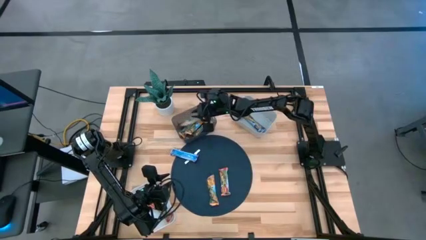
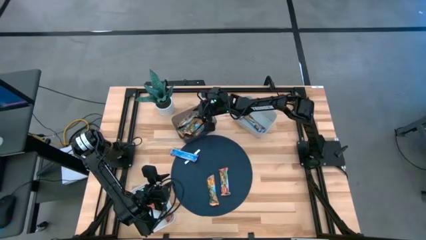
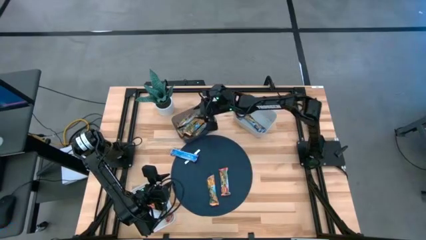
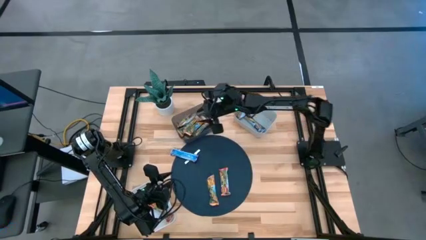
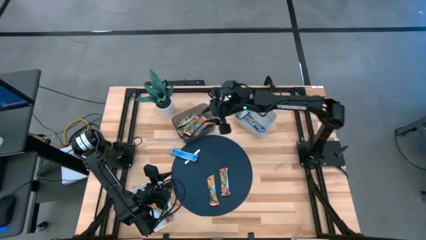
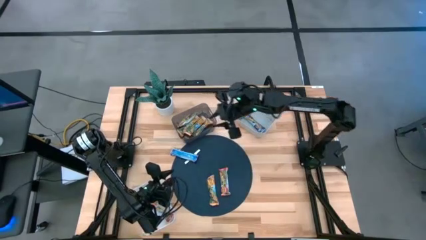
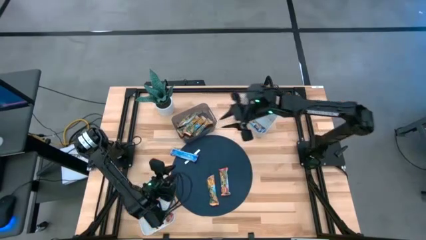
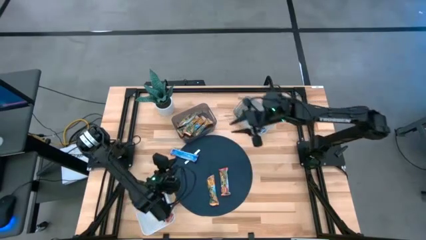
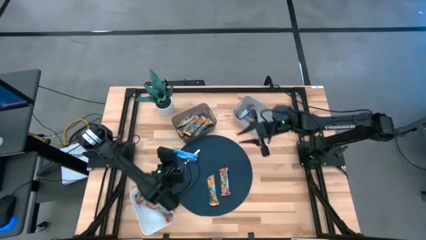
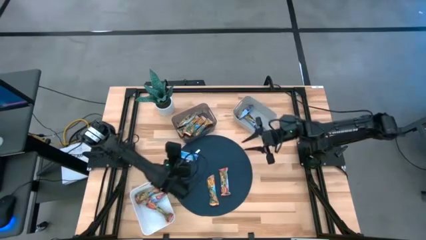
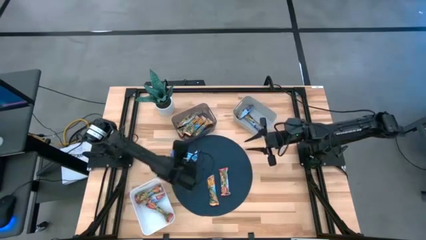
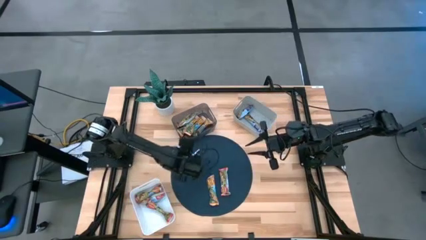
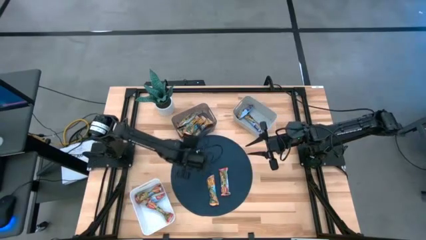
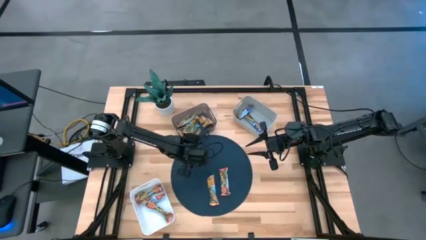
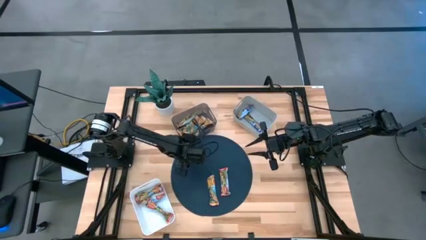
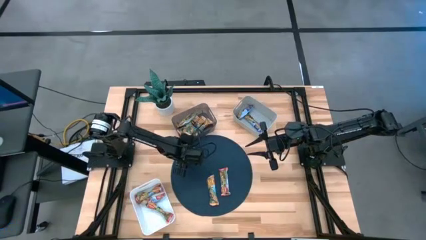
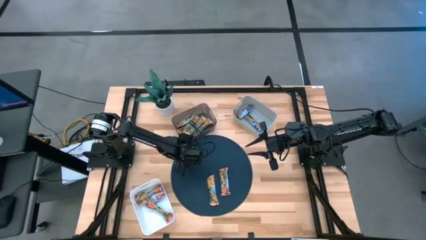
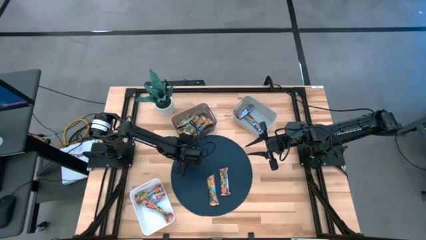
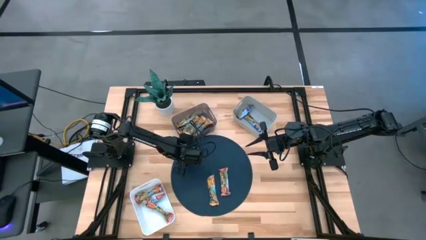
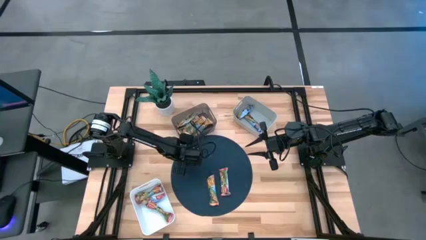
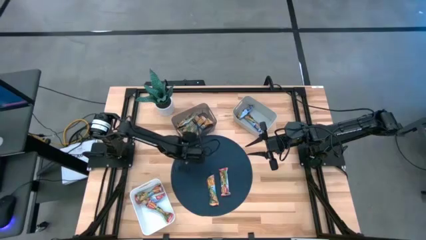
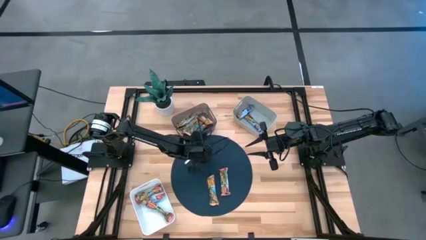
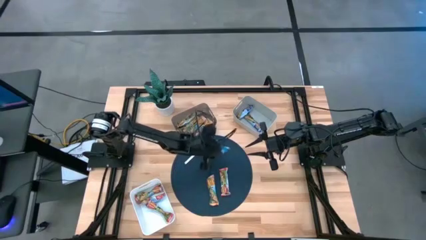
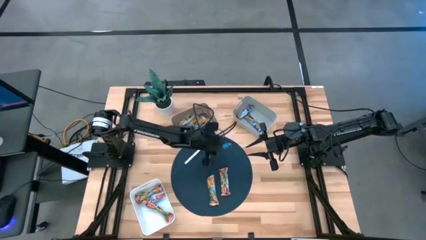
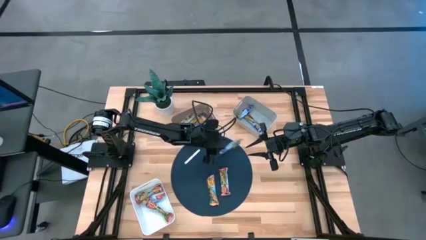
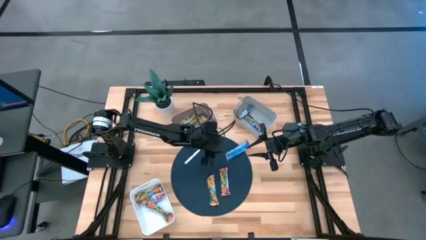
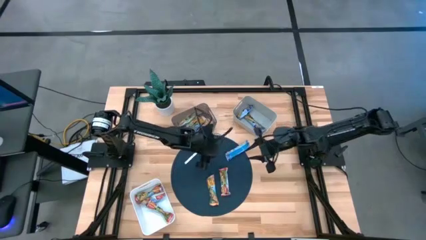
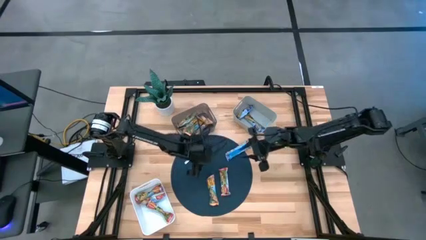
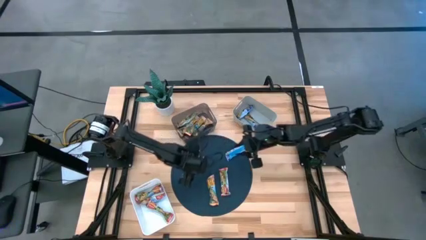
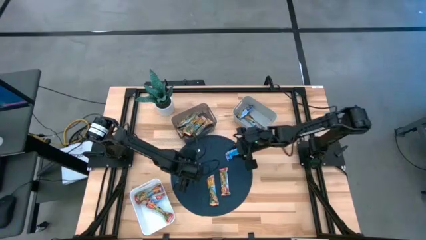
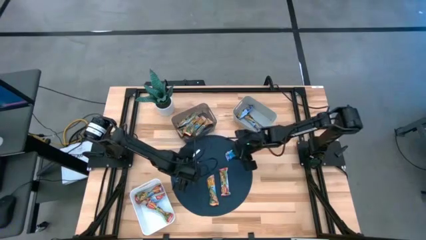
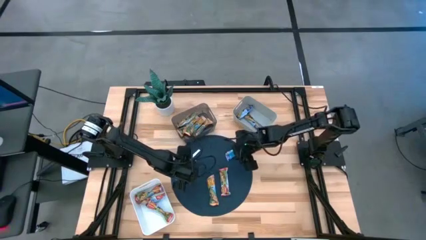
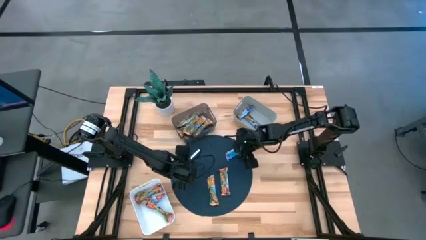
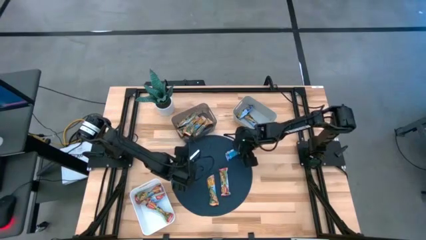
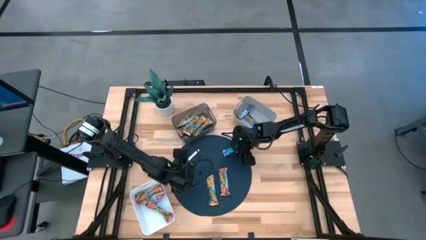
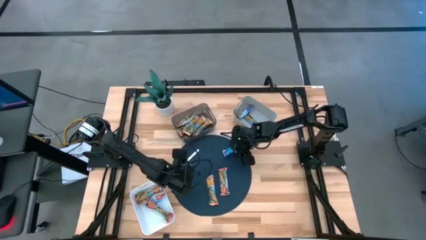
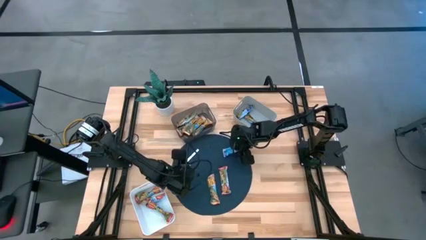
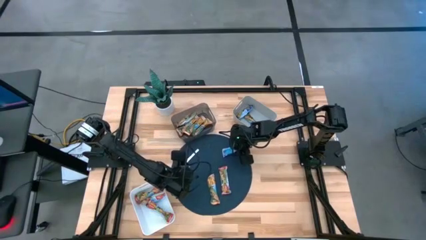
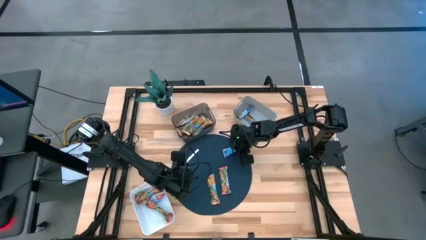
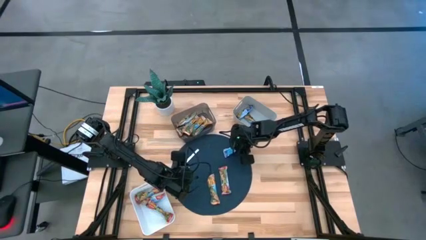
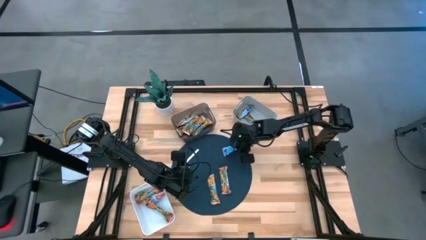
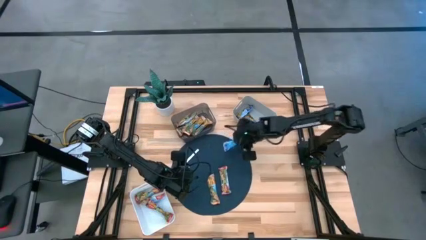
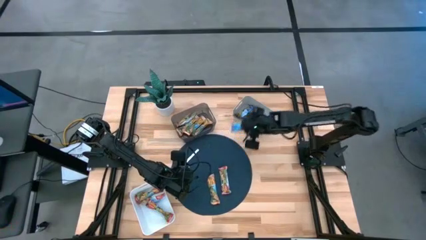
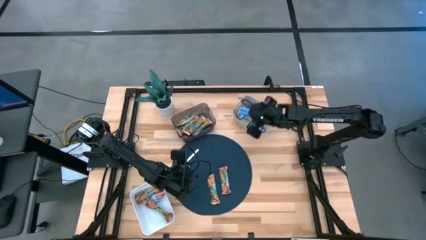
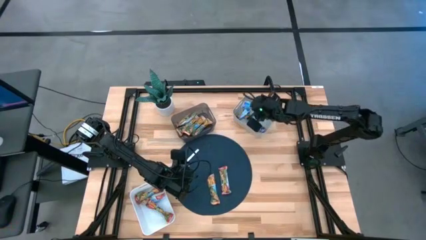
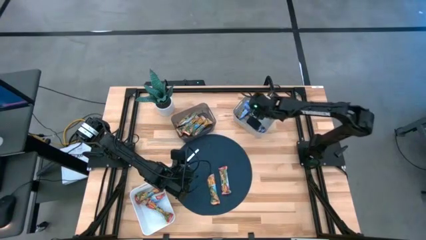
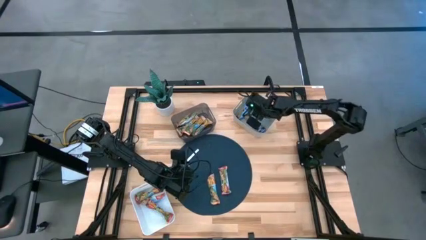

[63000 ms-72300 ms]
Task: Pick and place Granola Bars by type
Put the blue granola bar into the gray bin

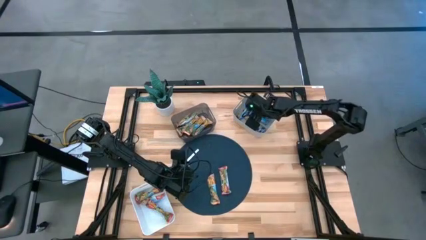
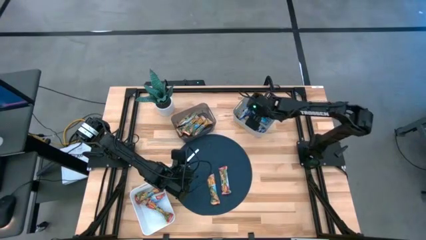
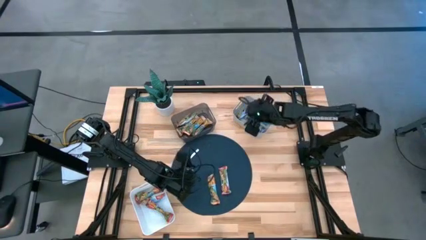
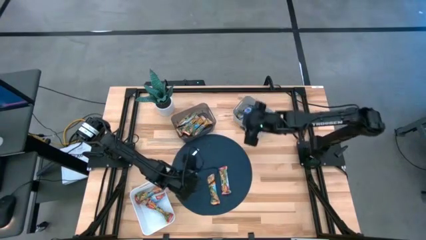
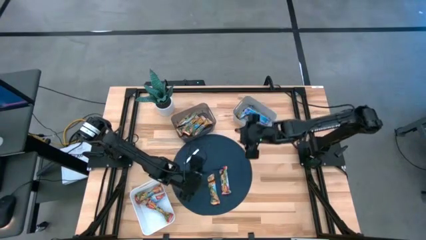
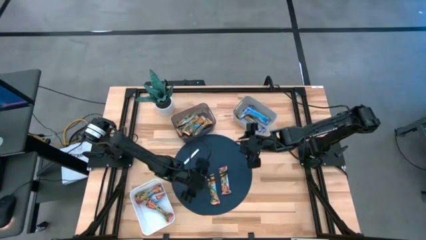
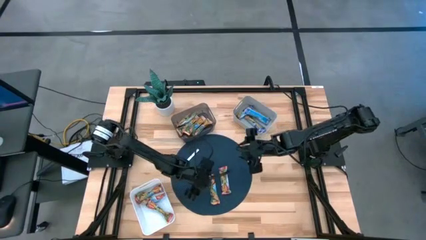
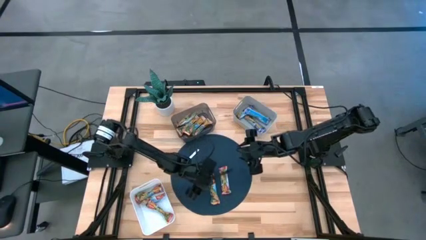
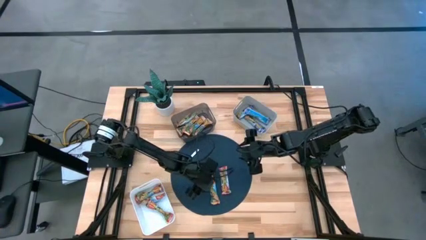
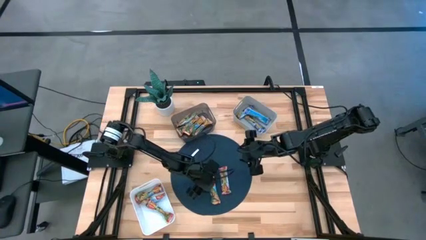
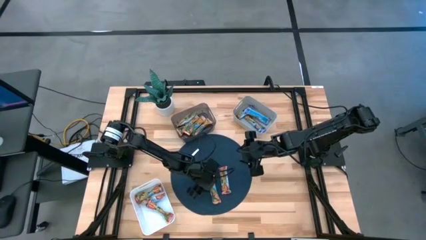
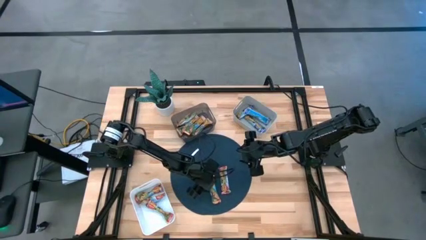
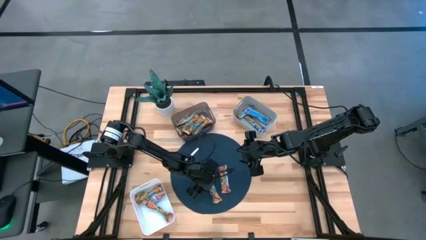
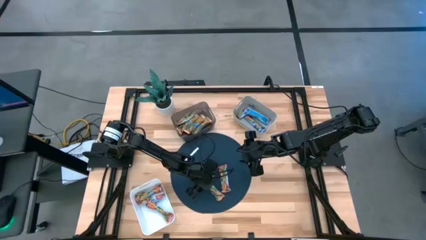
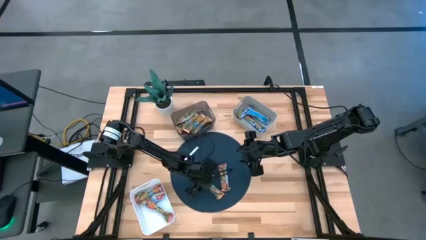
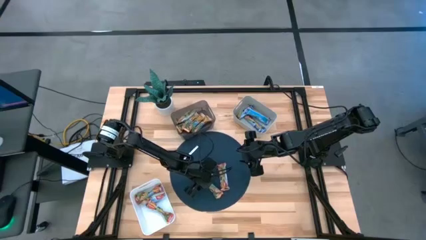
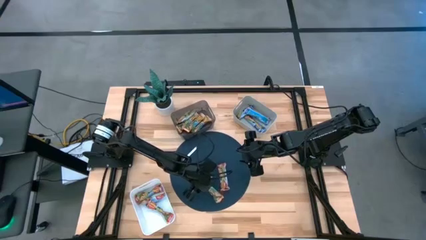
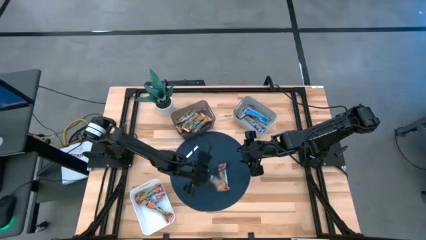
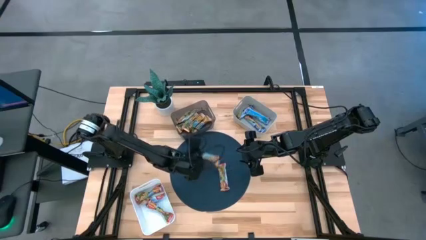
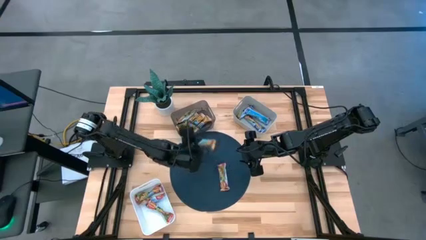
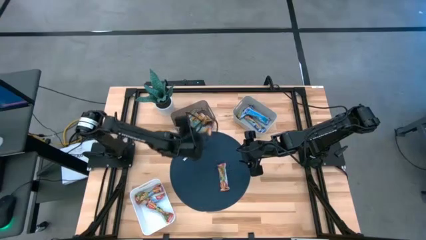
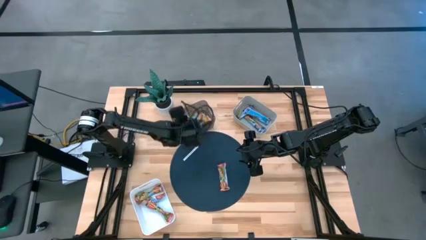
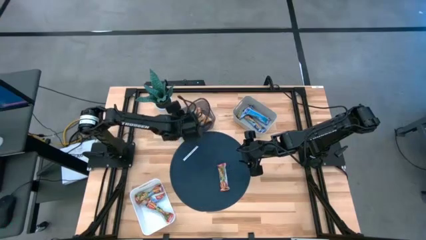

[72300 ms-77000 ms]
Put the yellow granola bar into the black bin

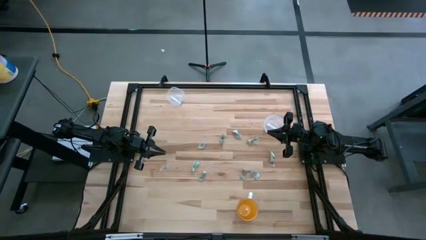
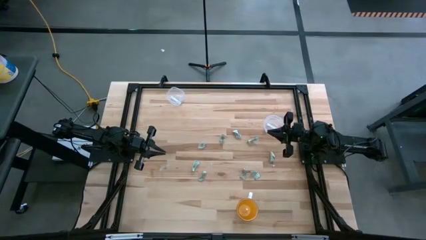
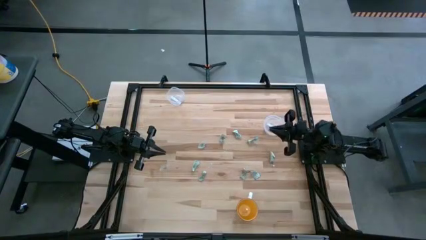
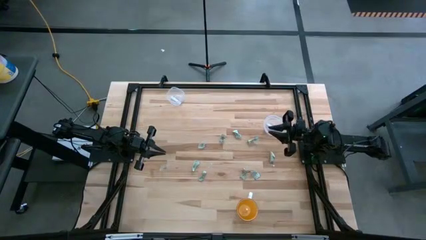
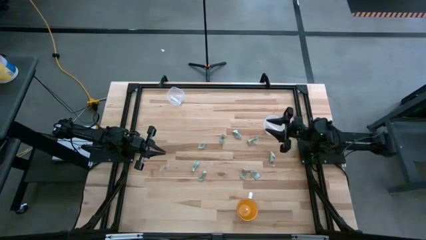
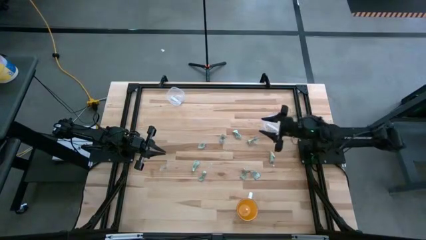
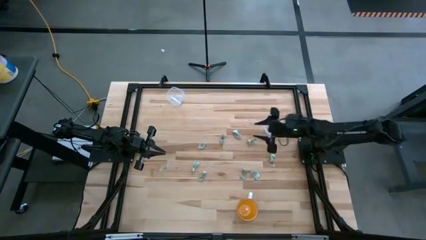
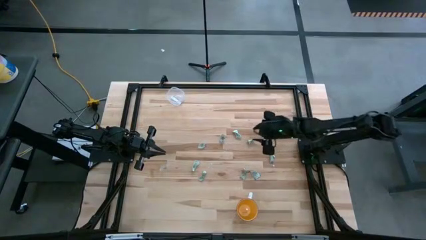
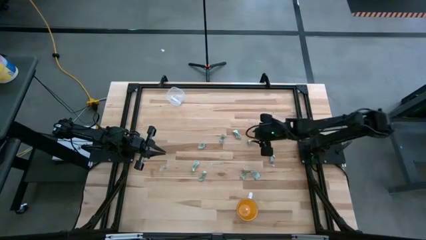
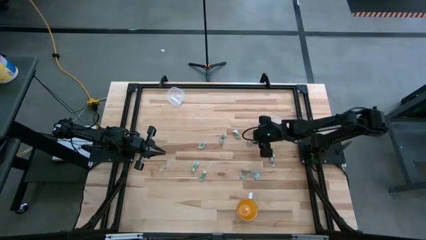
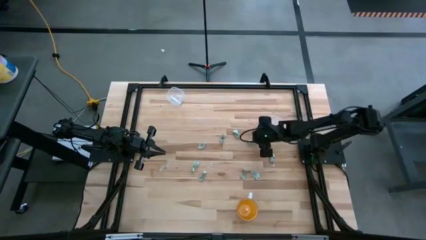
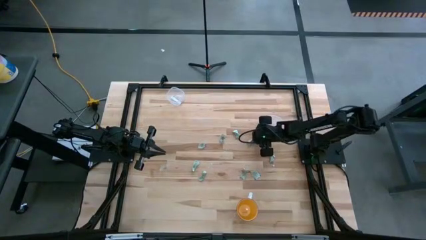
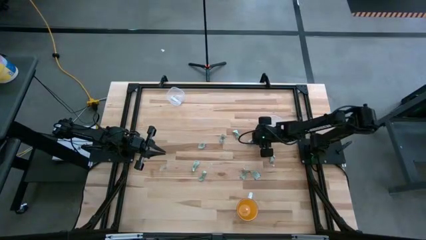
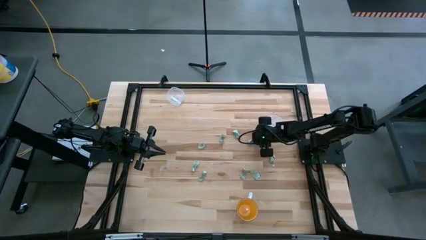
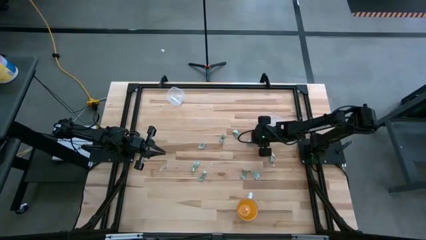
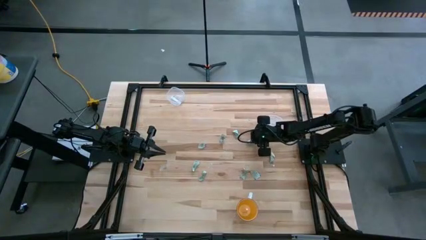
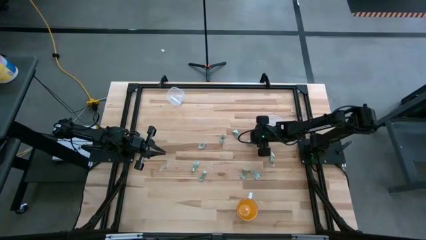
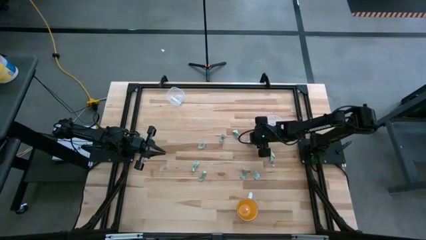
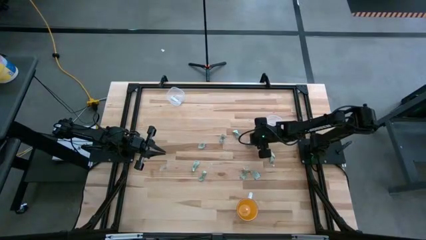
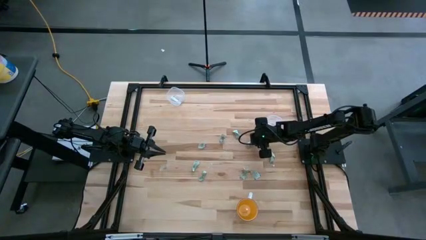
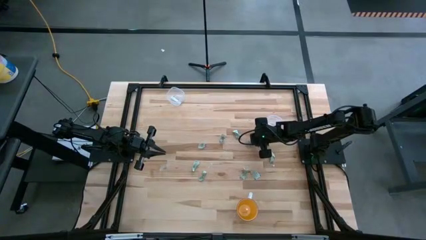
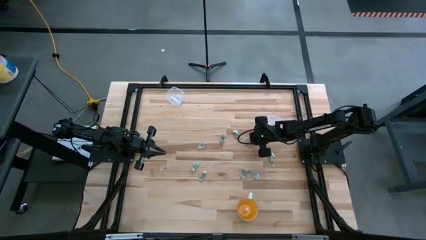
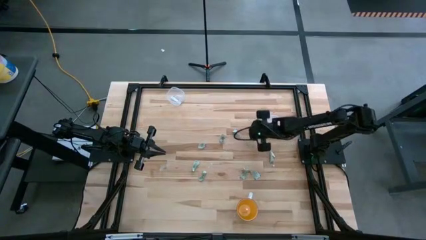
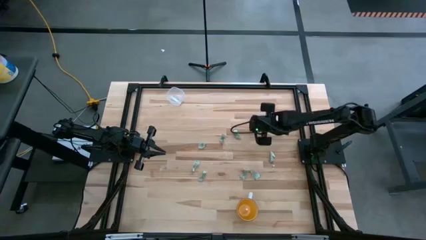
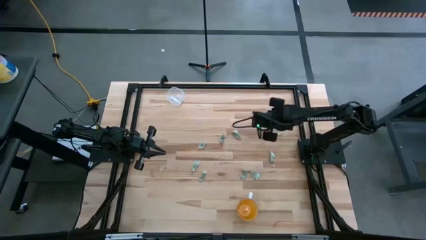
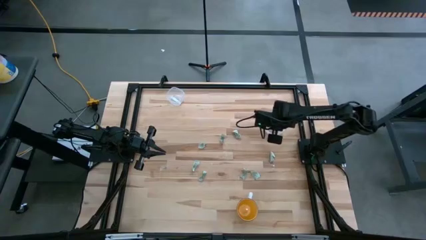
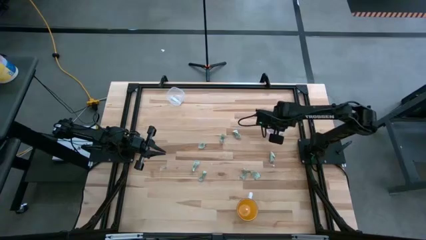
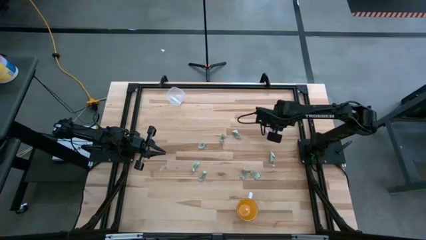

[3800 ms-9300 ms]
Task: Pick and place items into bin
Put the stevia packet into the bottom transparent bin
